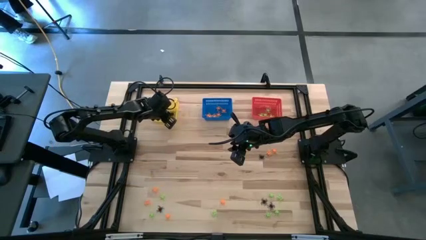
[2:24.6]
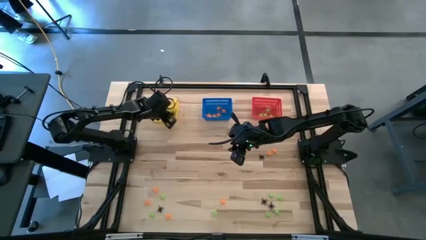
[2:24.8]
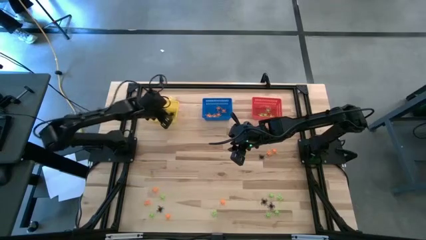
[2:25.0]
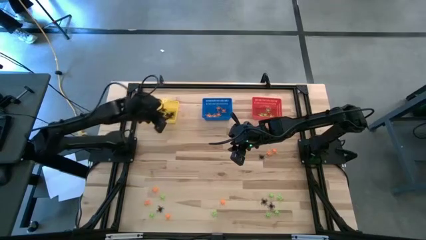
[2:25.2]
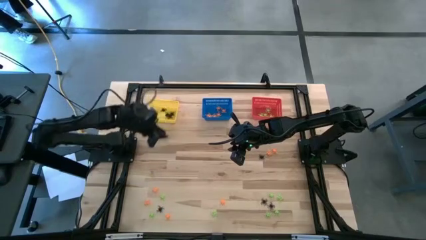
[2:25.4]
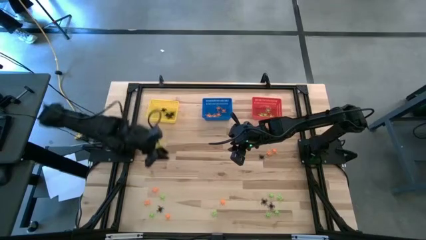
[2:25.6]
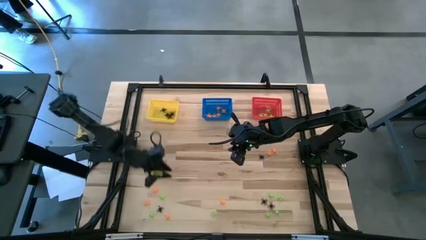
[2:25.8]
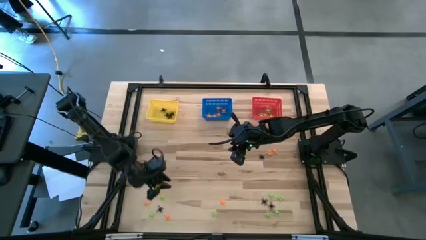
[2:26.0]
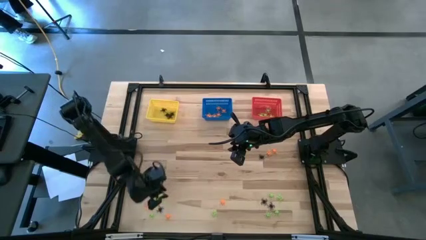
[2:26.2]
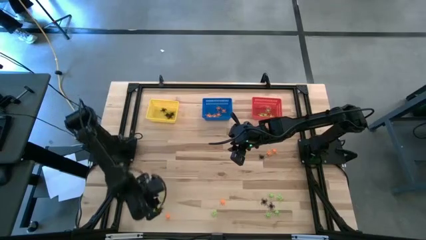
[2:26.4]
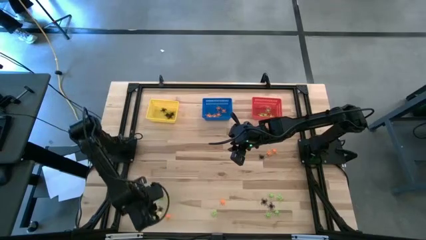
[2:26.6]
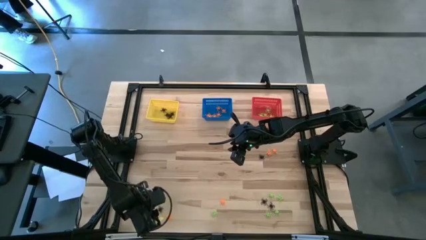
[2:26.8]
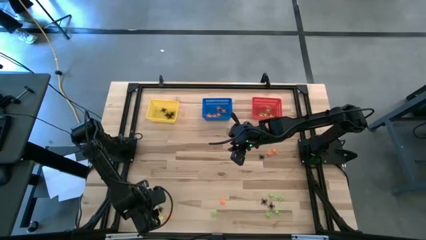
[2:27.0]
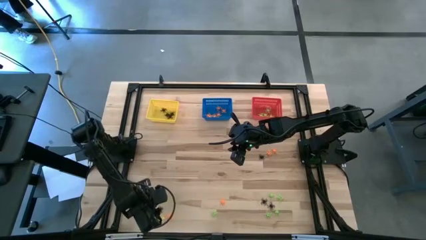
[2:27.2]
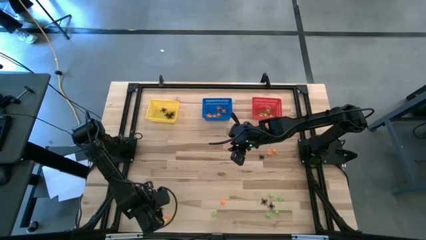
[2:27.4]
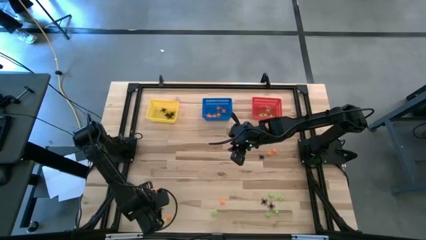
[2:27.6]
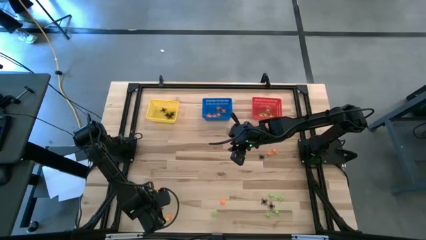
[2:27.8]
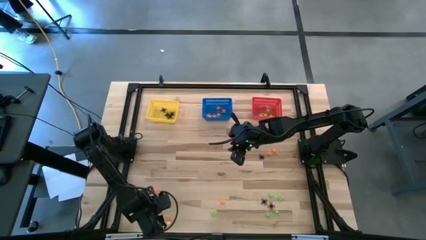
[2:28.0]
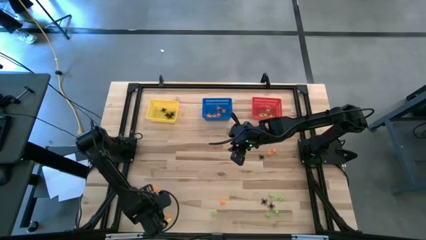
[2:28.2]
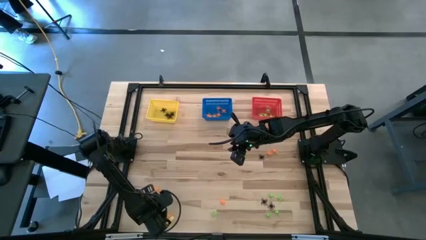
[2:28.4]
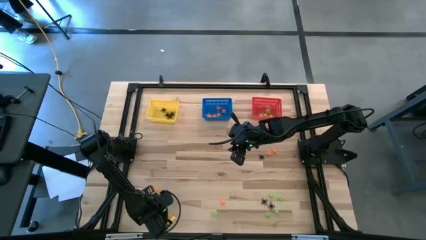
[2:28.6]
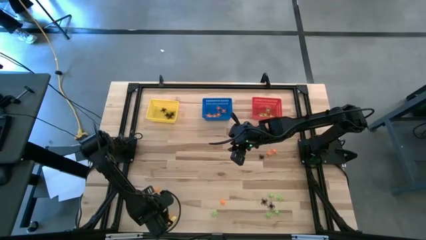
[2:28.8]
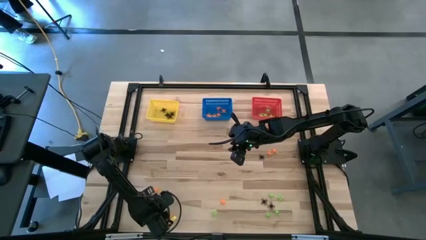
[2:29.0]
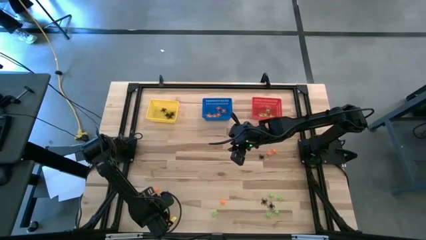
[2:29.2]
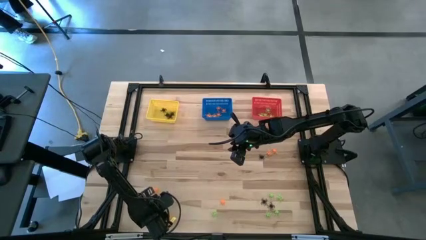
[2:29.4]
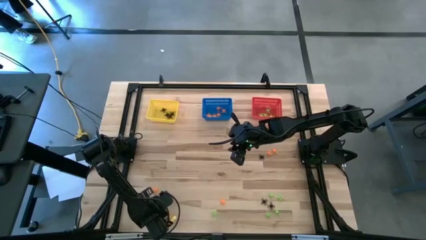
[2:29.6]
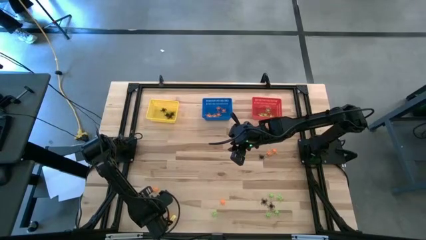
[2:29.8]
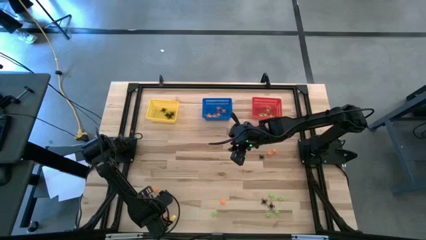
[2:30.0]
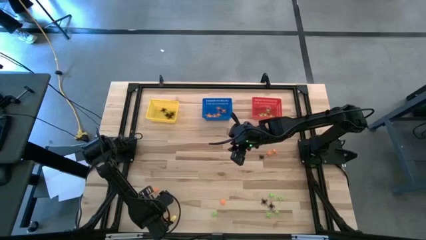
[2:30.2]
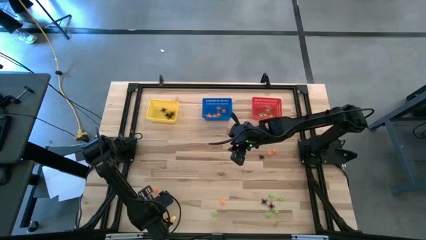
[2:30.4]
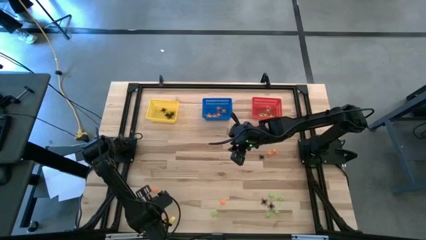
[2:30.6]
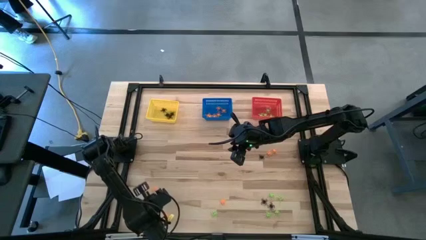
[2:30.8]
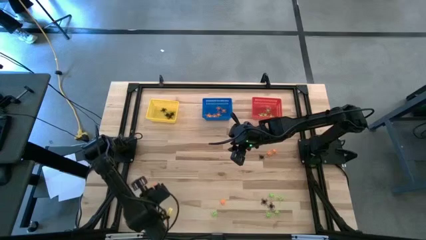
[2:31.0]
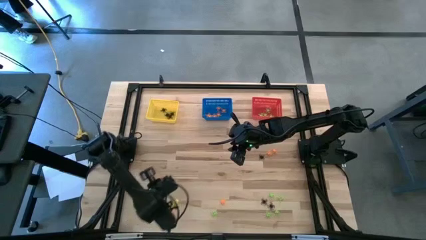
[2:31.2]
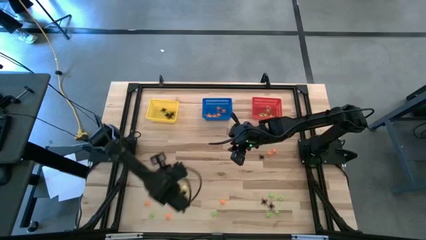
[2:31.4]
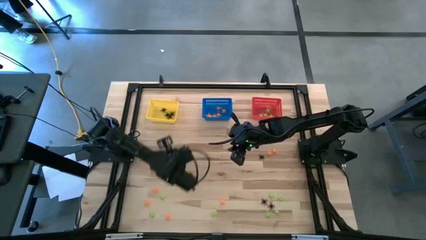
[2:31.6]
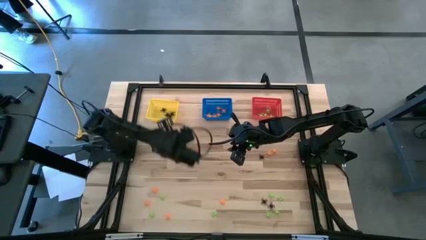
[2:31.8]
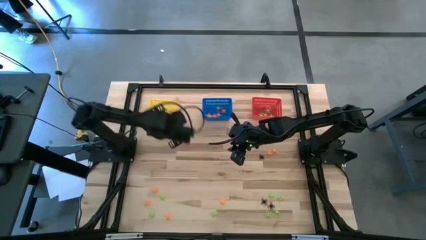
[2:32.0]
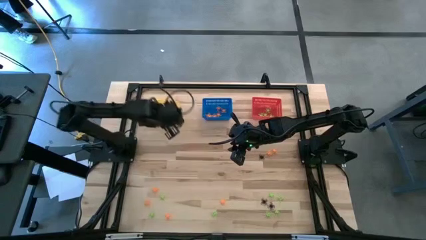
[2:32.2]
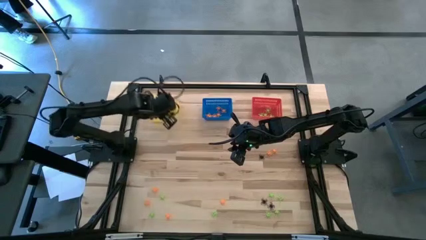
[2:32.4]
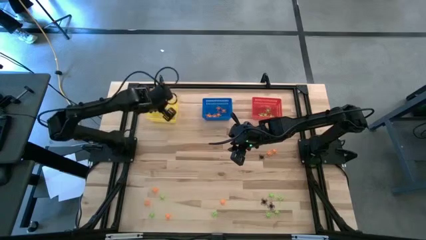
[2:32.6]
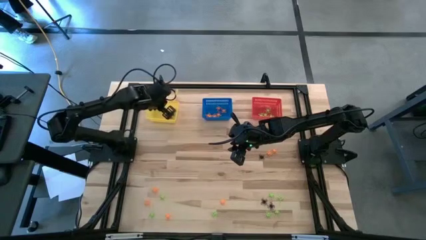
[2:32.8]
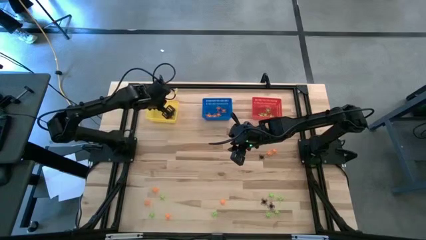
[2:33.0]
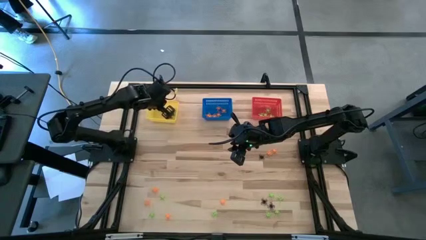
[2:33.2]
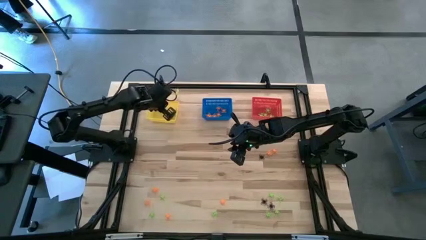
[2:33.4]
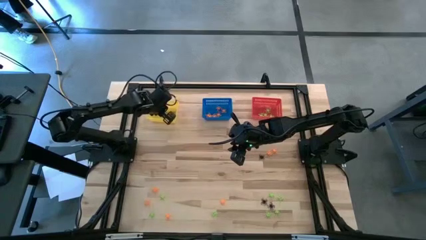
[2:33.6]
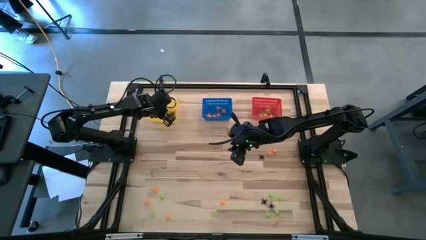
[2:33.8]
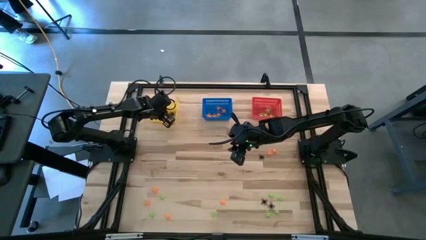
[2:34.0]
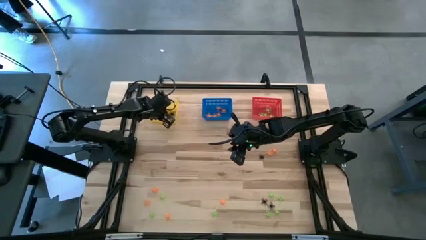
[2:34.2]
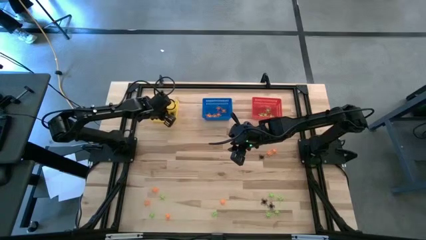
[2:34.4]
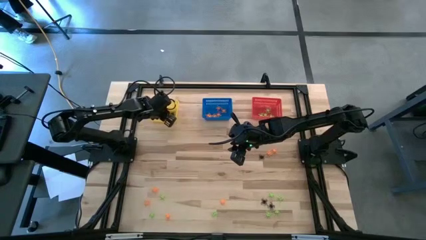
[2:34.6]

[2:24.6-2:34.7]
Task: Sort Halloween decoration
Put the black spider toy into the yellow basket

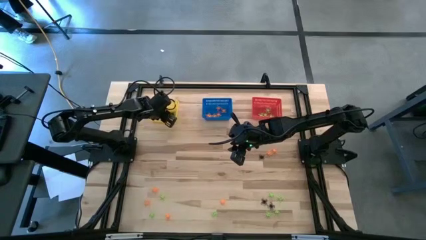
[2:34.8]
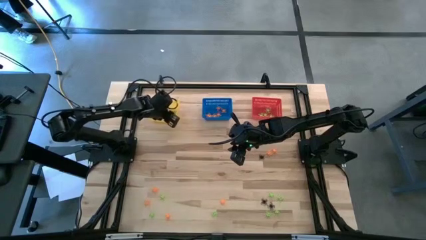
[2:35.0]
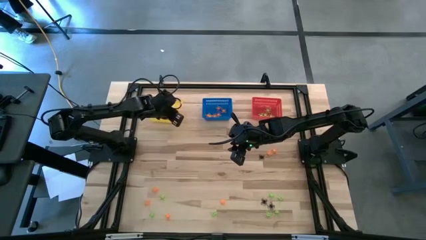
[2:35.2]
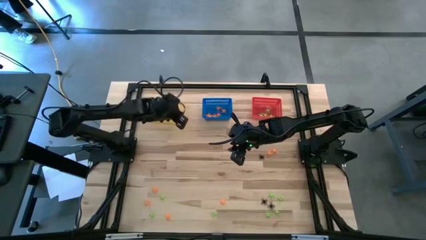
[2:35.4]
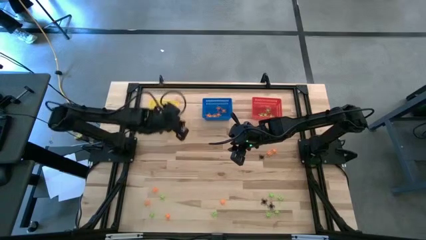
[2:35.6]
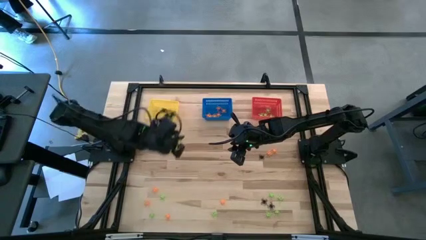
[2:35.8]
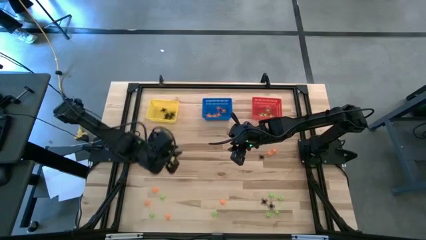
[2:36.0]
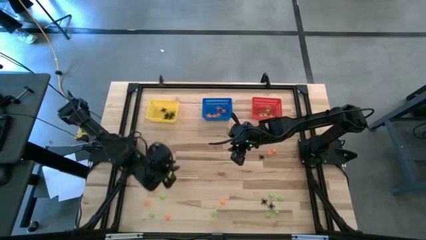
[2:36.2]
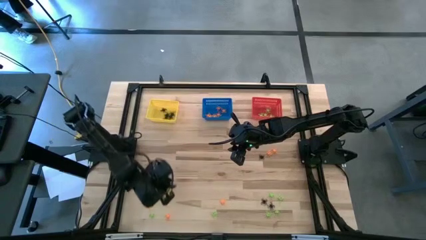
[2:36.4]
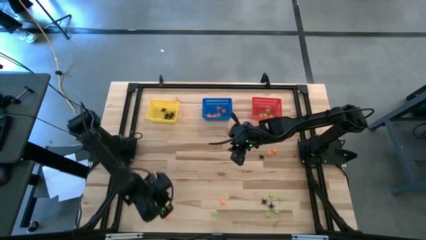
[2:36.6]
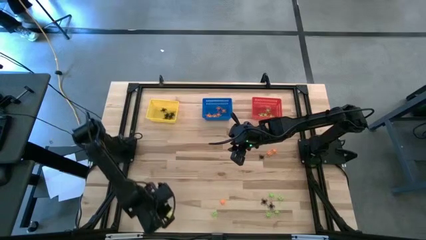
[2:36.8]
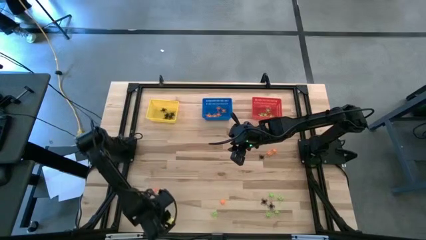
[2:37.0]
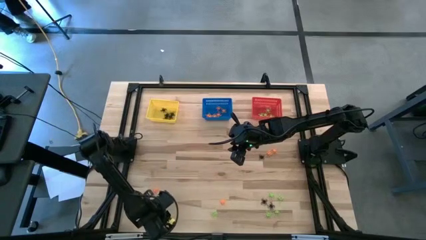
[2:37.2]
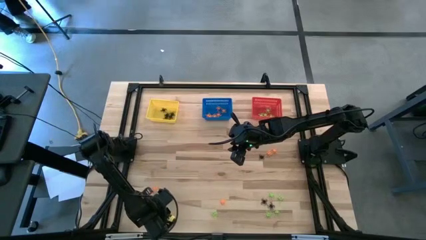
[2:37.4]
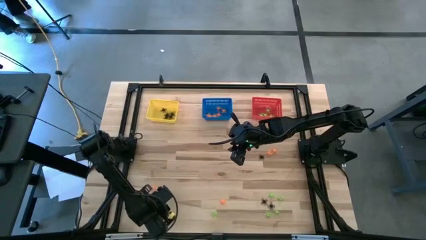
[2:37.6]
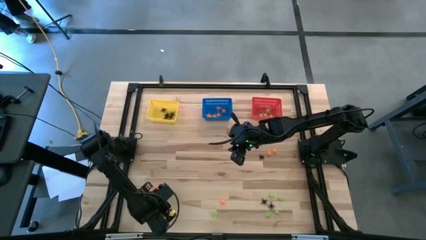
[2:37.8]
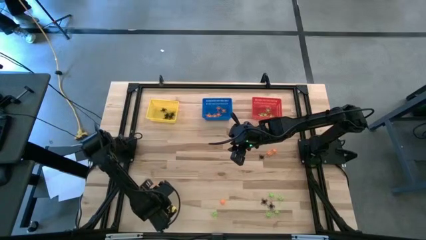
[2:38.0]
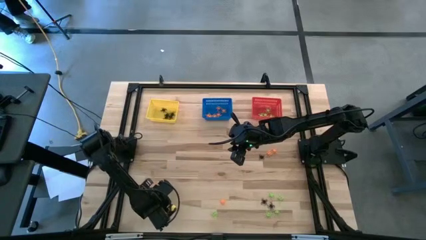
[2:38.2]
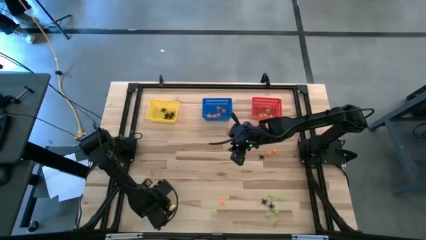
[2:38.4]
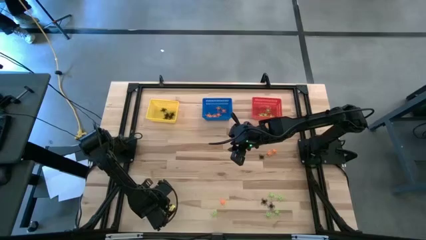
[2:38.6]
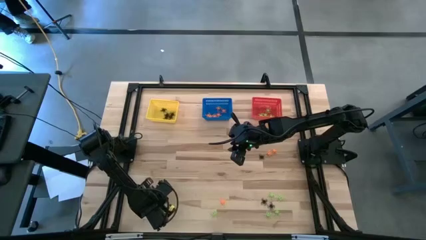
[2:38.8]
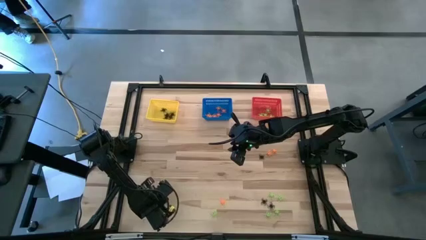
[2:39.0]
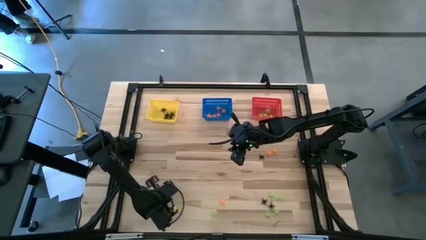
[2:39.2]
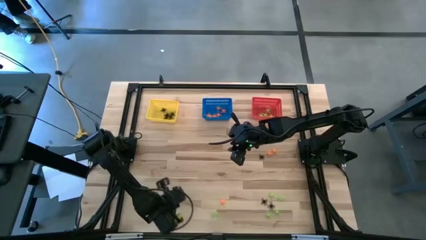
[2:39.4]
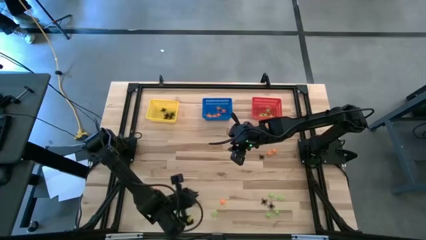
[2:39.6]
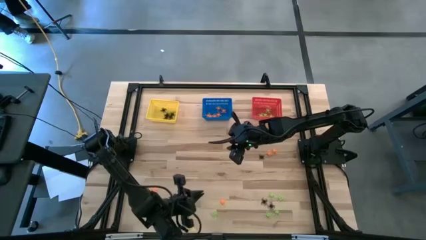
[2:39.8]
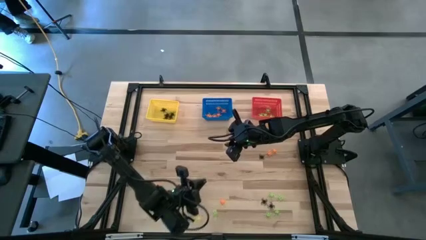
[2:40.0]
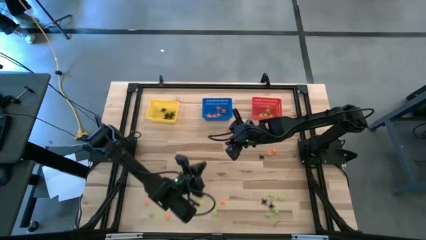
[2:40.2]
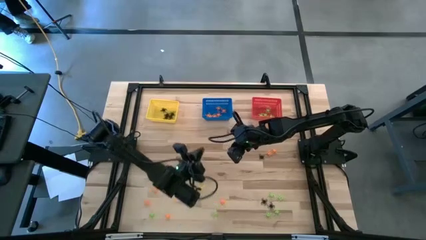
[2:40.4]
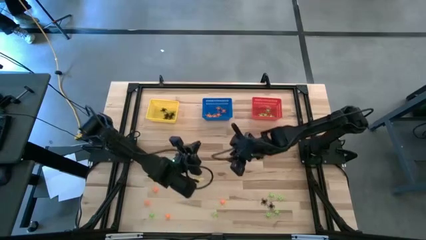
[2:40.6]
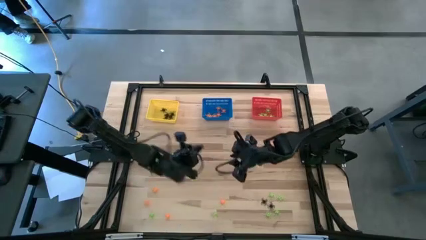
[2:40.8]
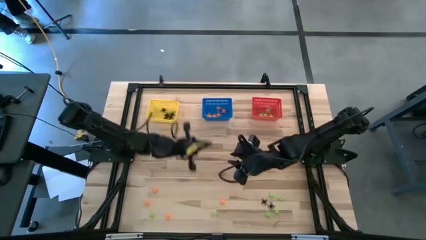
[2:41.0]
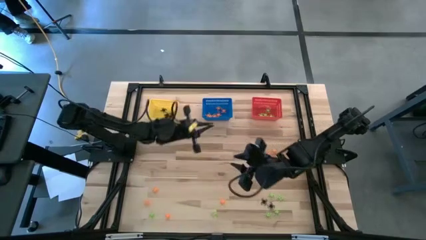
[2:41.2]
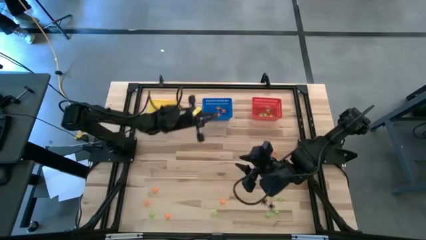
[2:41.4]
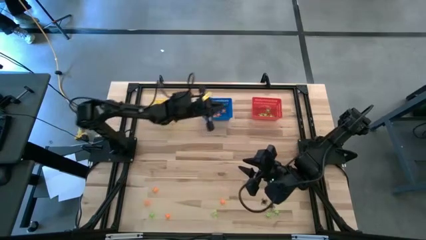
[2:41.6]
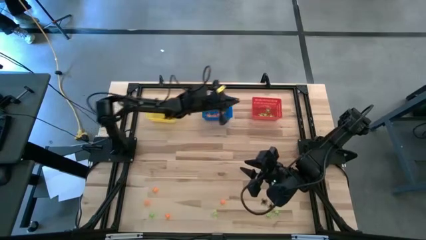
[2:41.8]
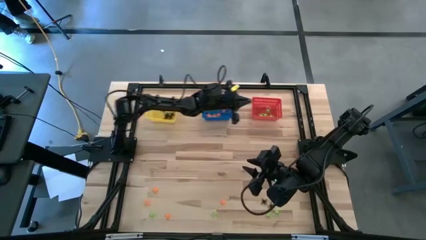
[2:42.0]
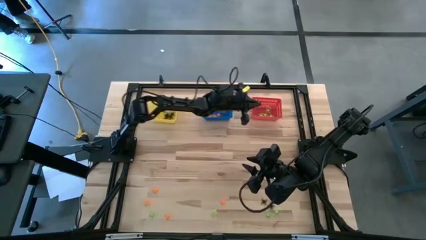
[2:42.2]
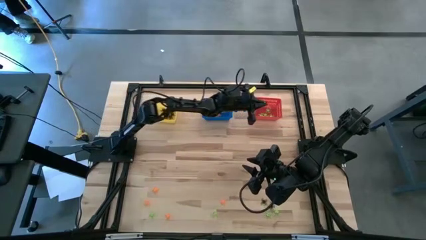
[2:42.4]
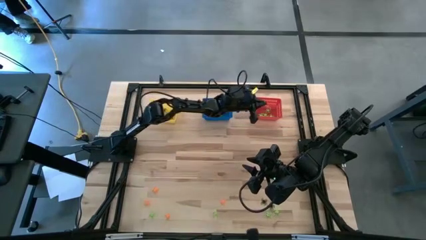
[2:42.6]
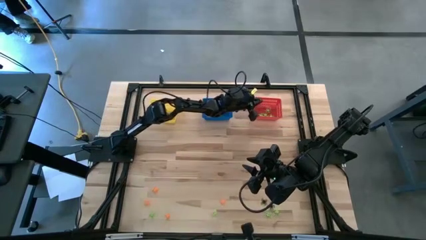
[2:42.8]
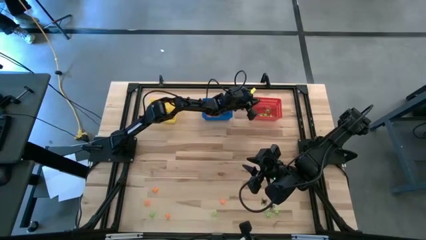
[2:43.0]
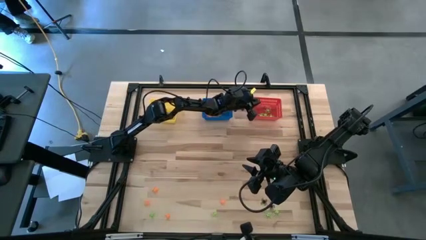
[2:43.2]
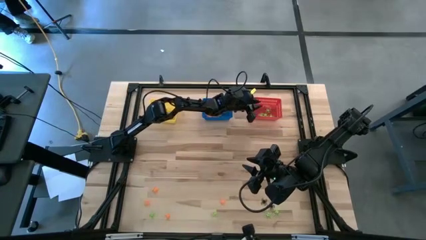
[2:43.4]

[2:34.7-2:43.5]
Put the green spider toy into the red basket
